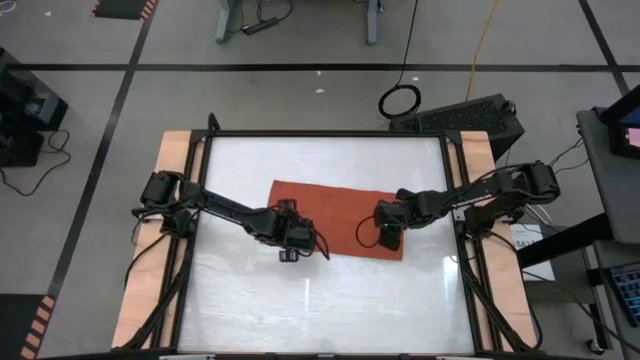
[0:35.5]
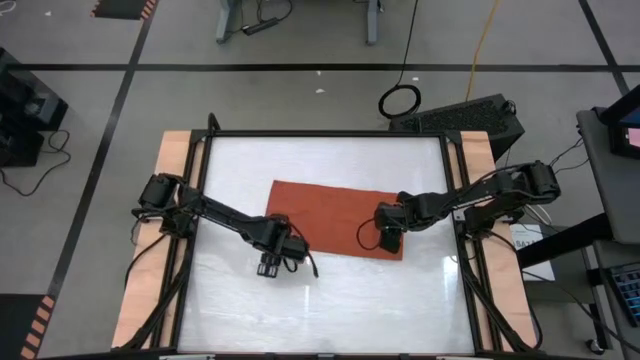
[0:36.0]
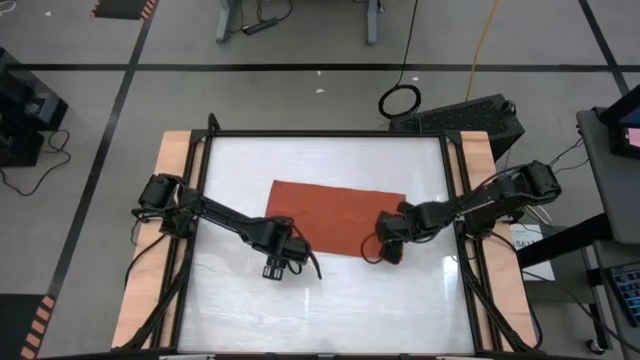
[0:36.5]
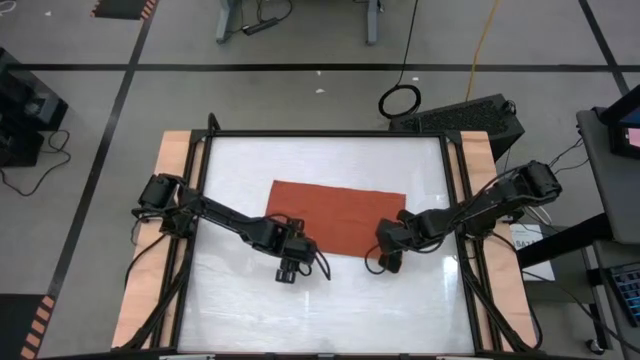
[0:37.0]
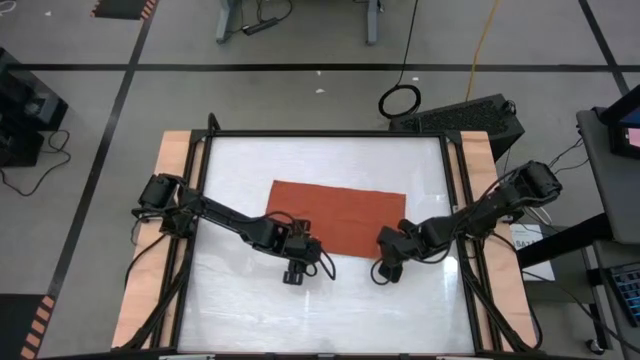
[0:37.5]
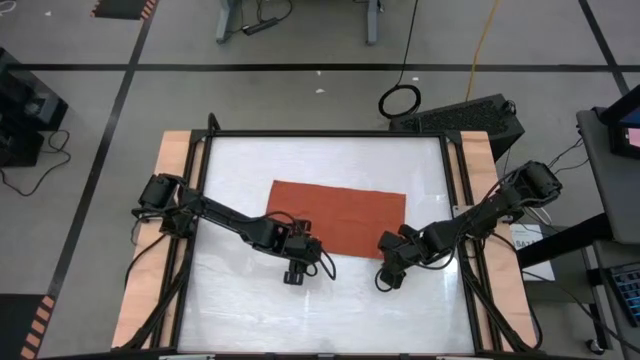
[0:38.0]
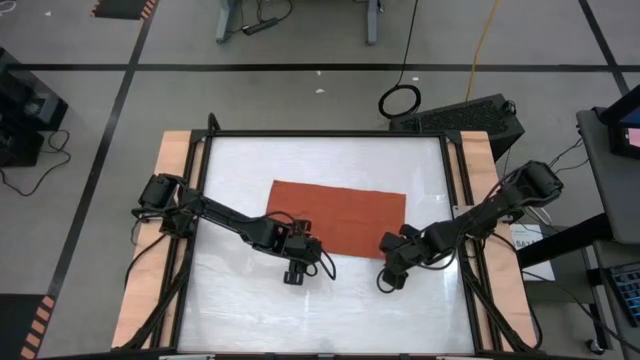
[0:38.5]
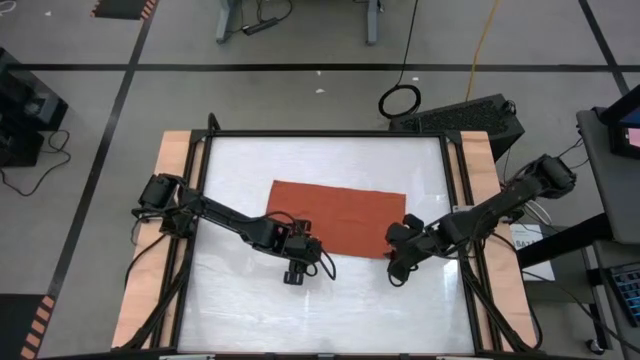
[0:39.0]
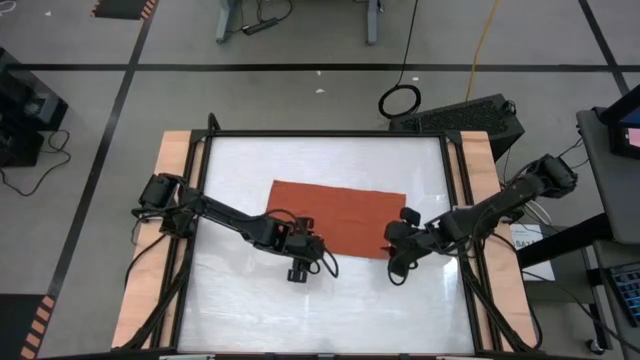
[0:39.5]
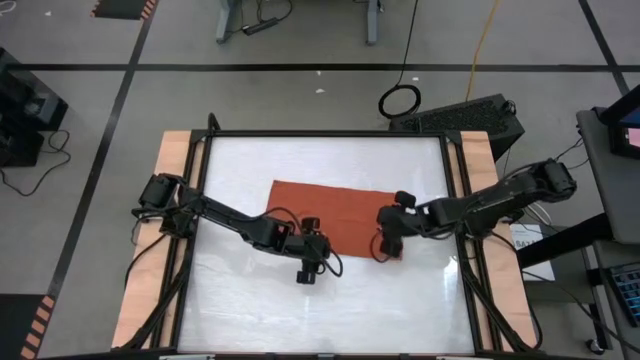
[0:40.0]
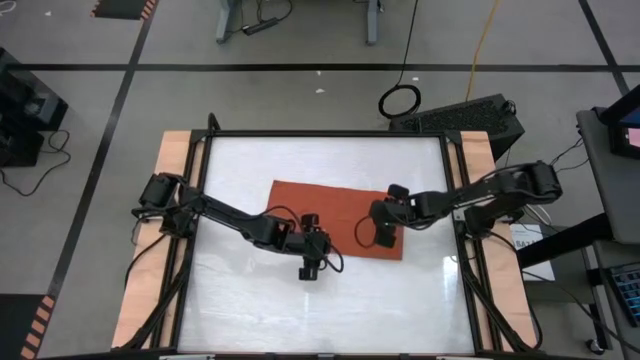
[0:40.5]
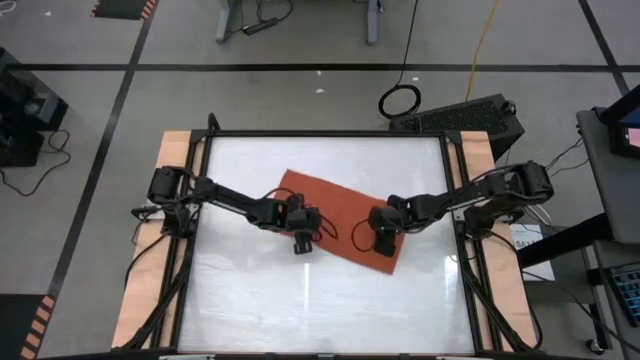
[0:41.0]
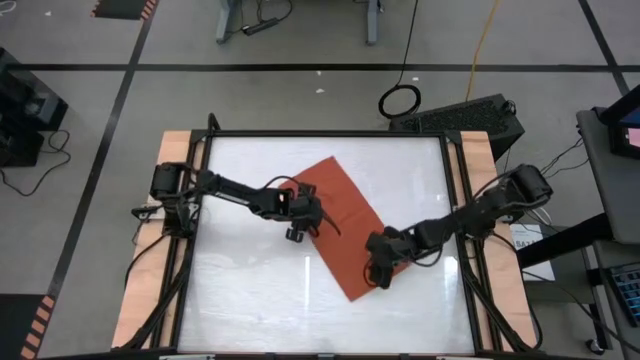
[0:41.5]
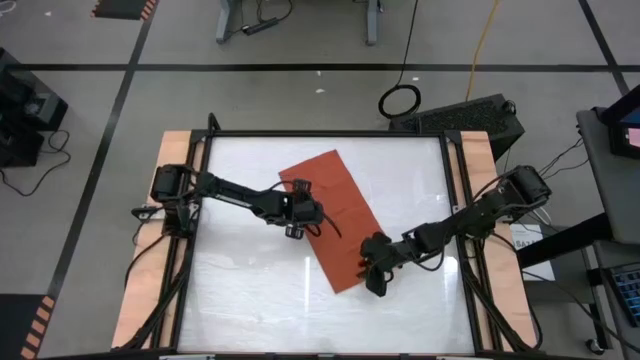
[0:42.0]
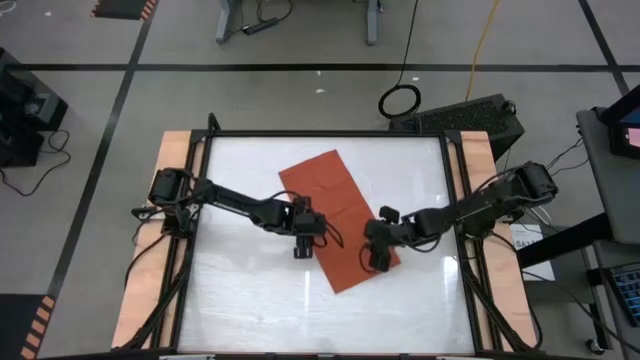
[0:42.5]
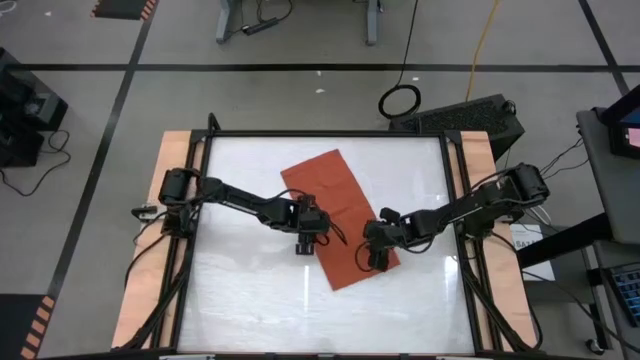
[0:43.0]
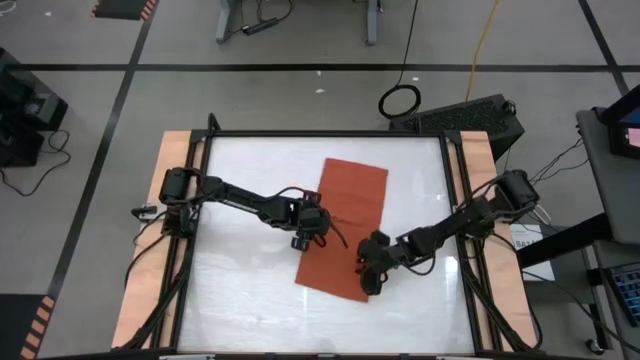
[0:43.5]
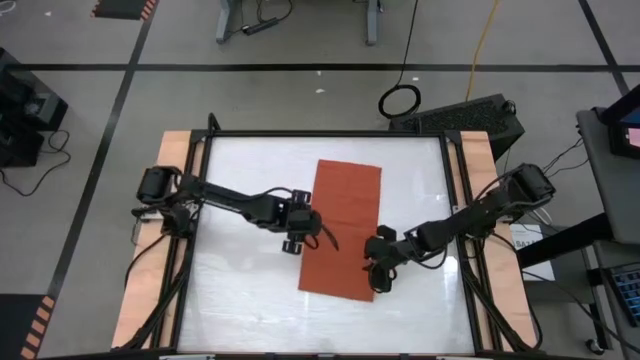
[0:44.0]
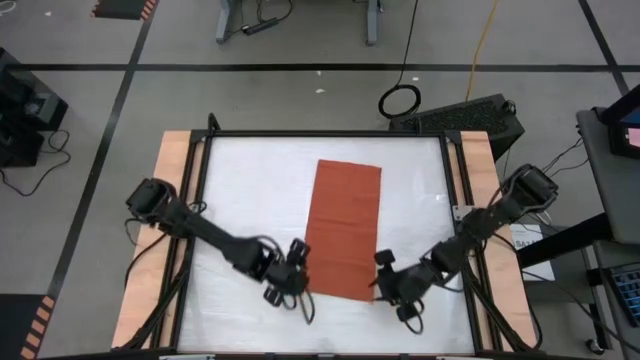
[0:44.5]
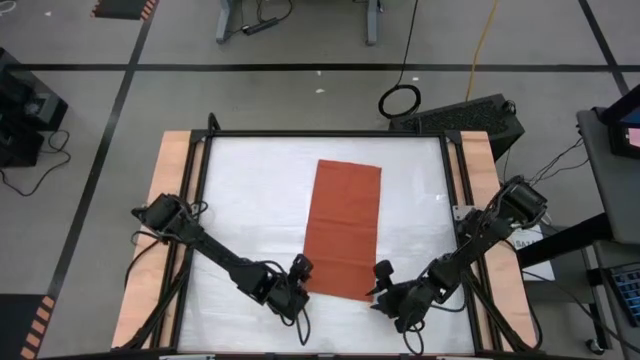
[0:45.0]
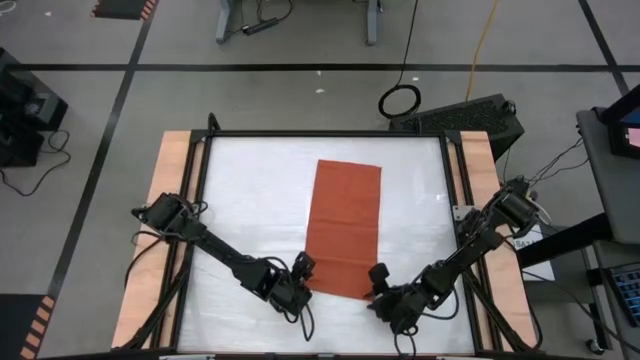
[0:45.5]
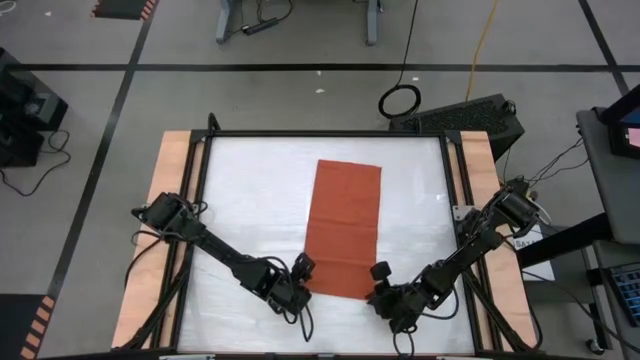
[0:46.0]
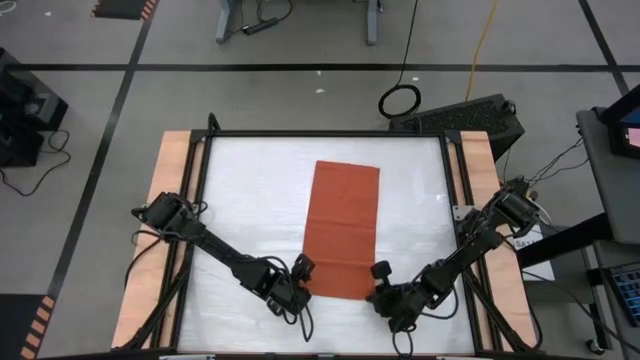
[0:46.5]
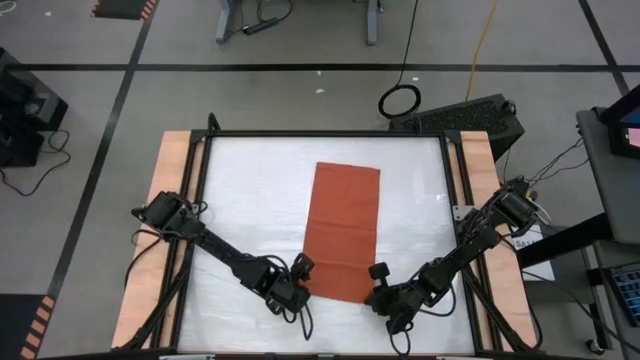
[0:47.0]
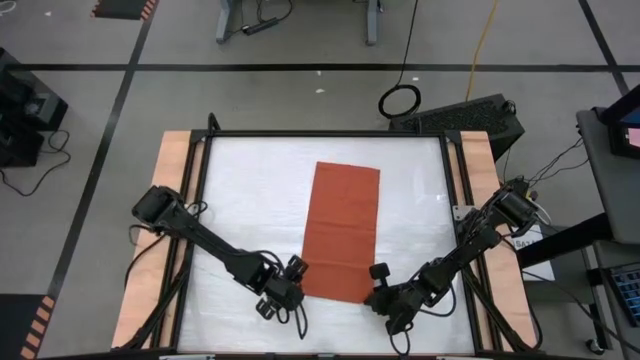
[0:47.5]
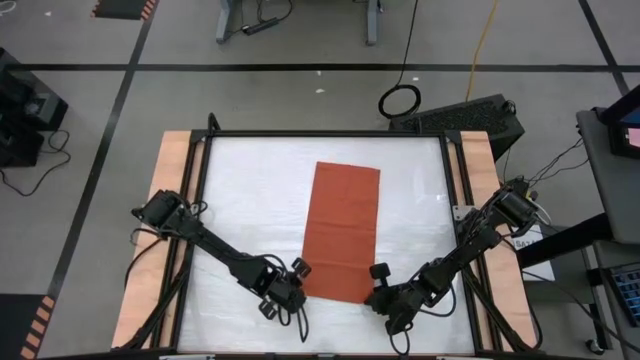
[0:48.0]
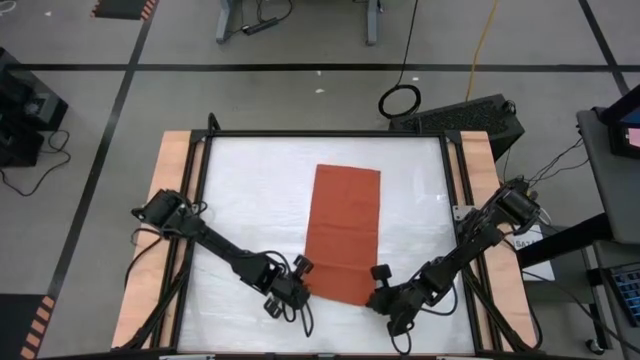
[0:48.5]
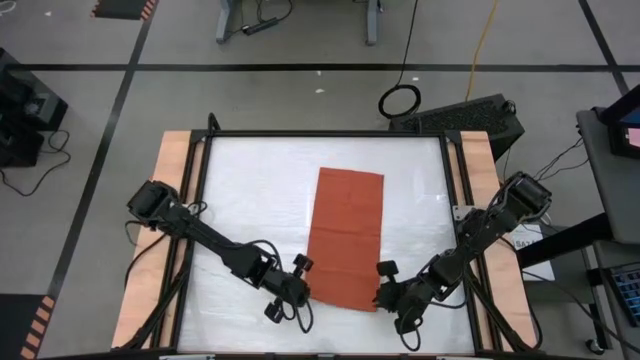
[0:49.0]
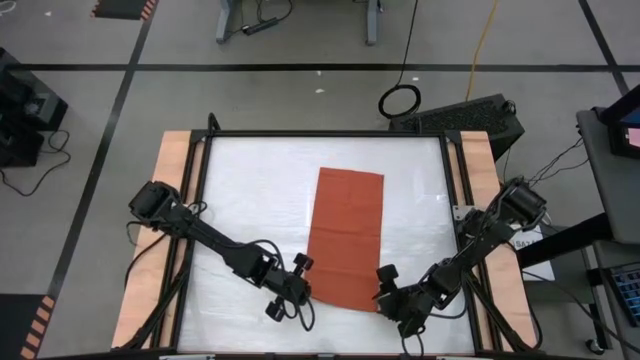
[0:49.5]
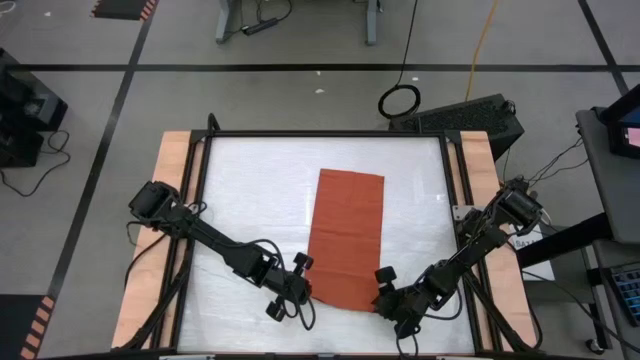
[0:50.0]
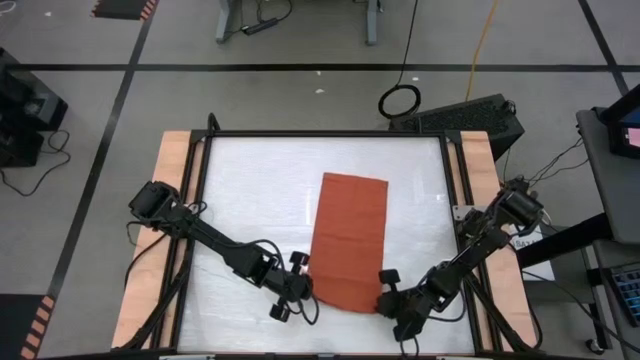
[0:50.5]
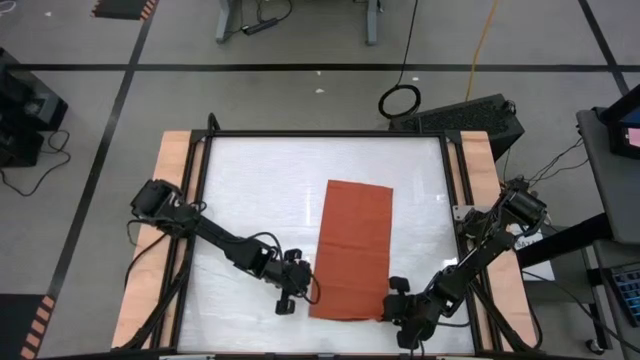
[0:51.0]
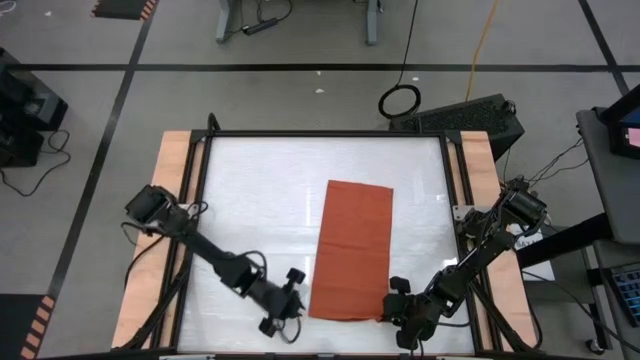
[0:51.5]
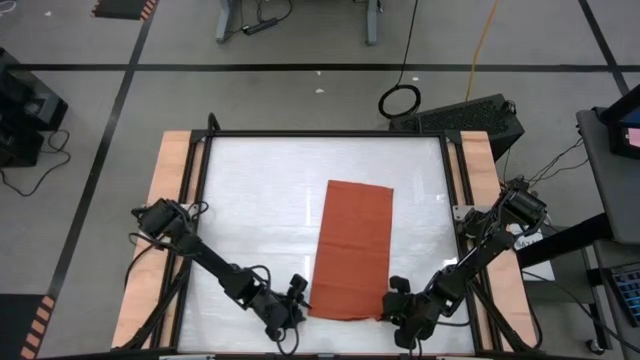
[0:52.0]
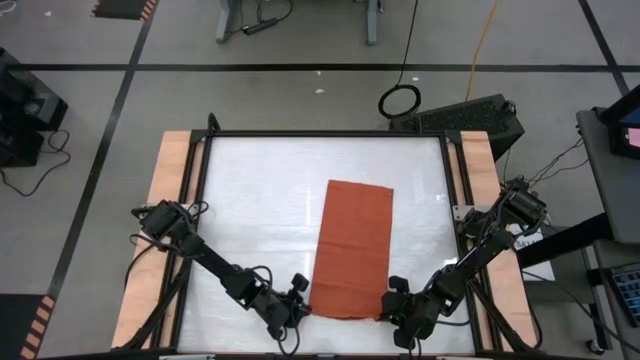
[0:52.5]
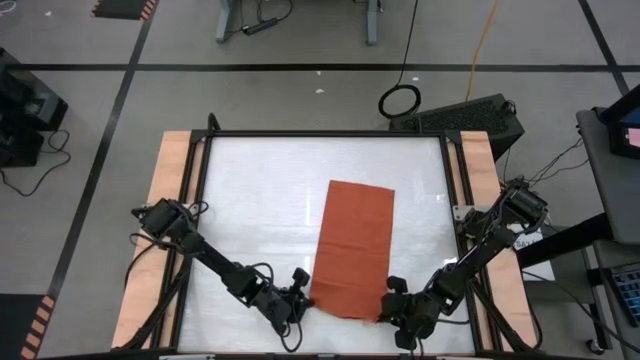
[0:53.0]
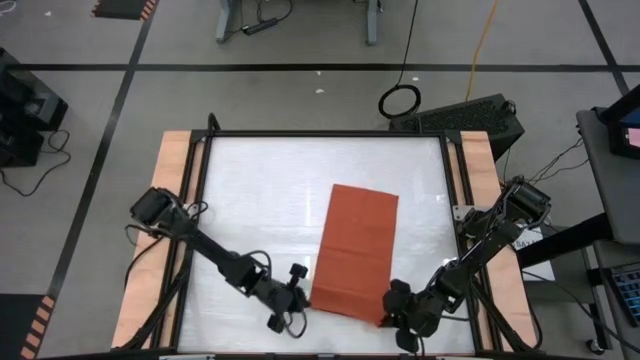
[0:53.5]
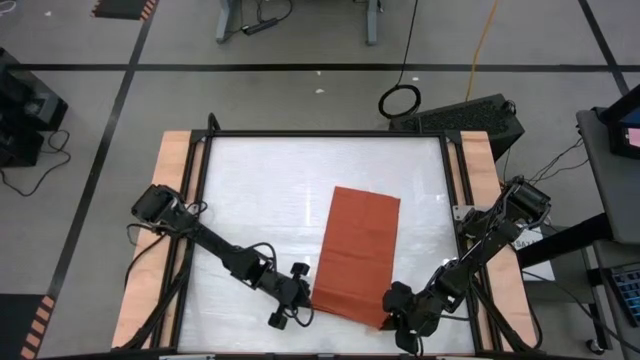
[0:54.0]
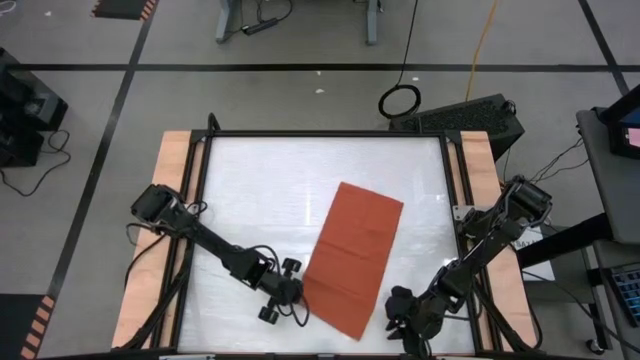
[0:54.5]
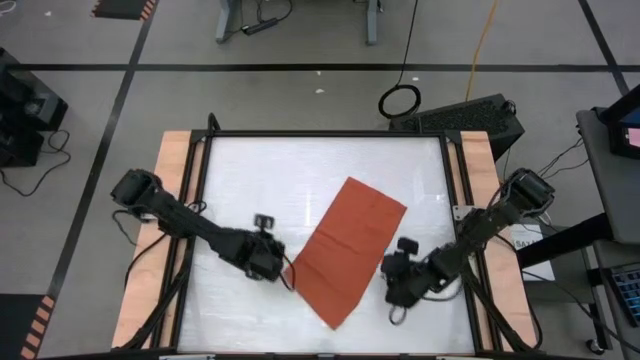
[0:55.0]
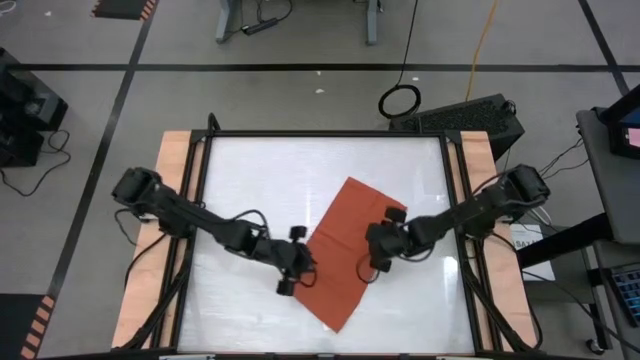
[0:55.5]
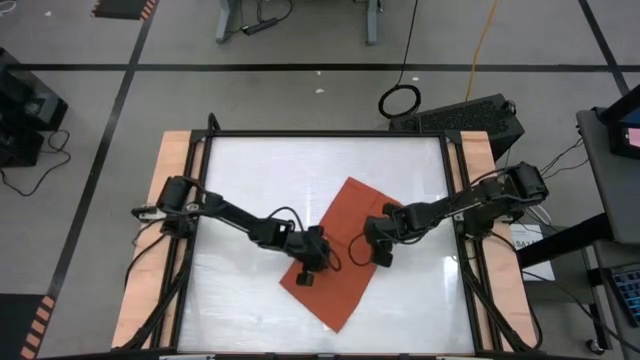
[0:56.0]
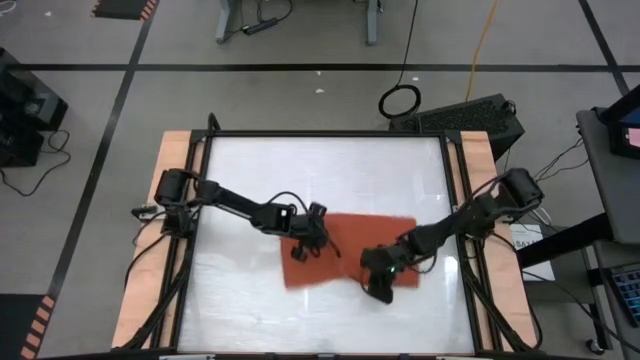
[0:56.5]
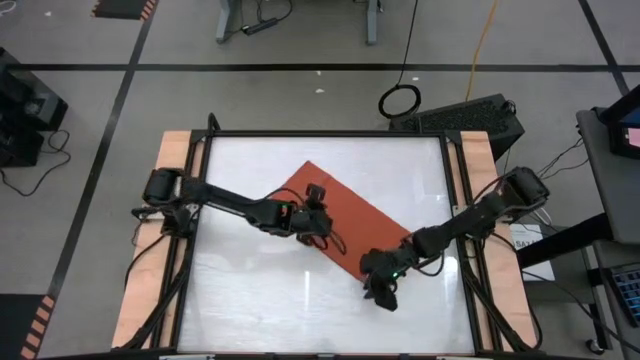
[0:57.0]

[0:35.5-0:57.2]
Task: Roll towel into tight, uniform cylinder
Roll the kitchen towel
